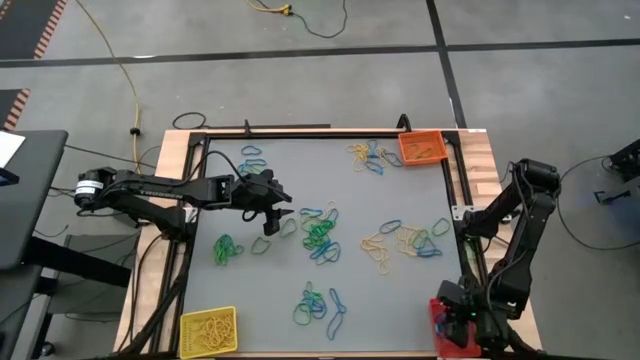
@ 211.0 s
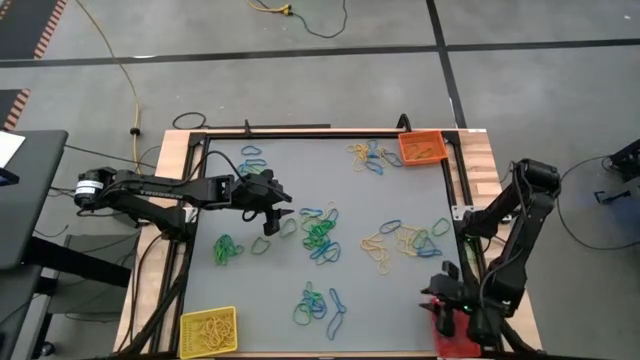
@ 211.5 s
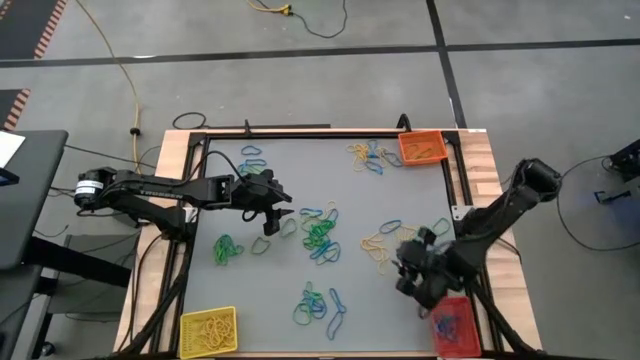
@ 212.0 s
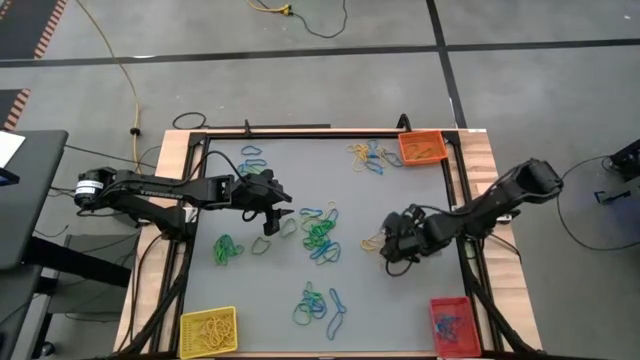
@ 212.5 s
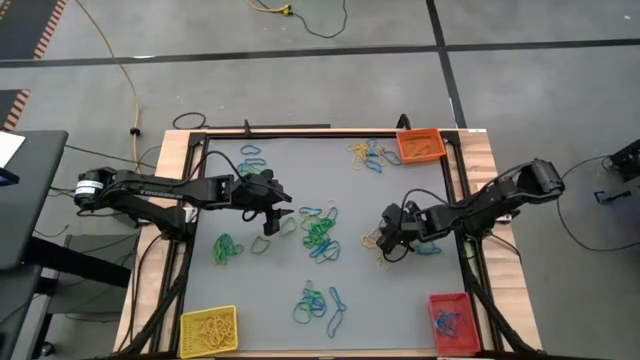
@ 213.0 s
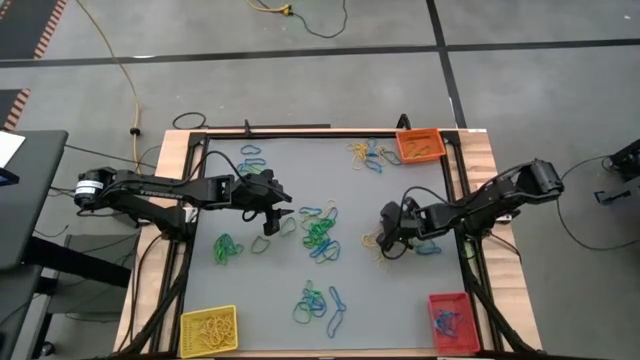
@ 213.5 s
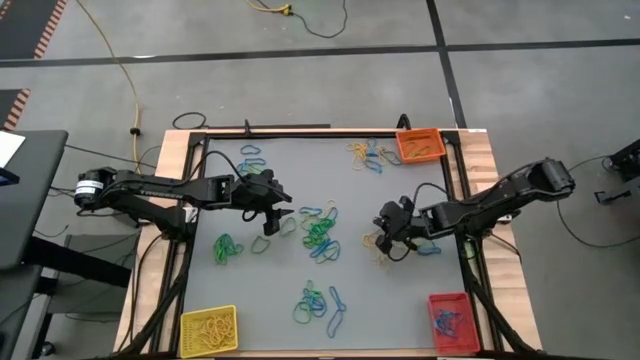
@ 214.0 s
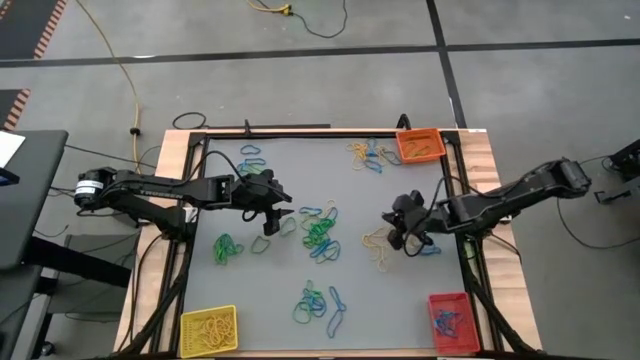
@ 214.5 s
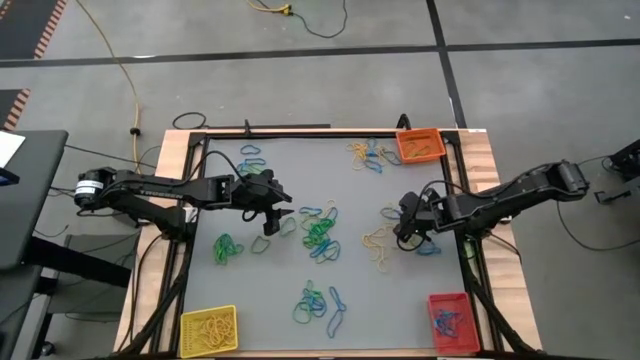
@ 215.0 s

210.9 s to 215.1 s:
Task: Sort rubber bands into baskets
Put the blue rubber band into the red bin

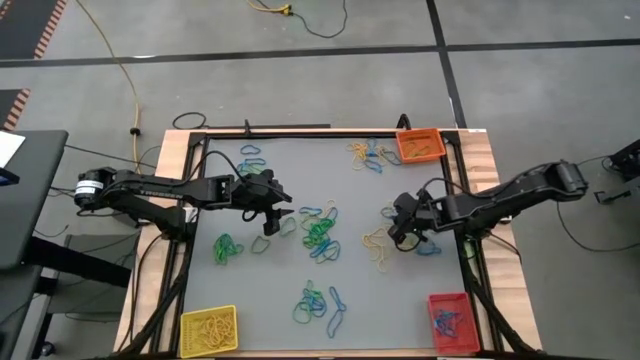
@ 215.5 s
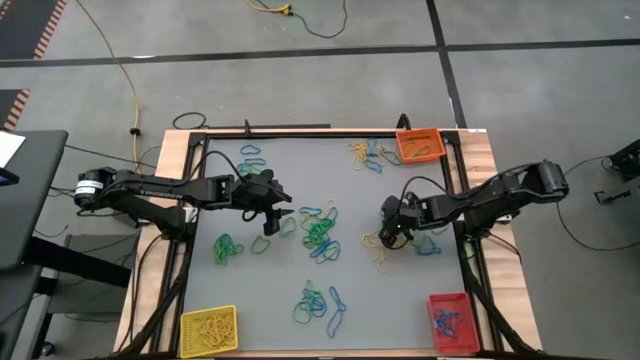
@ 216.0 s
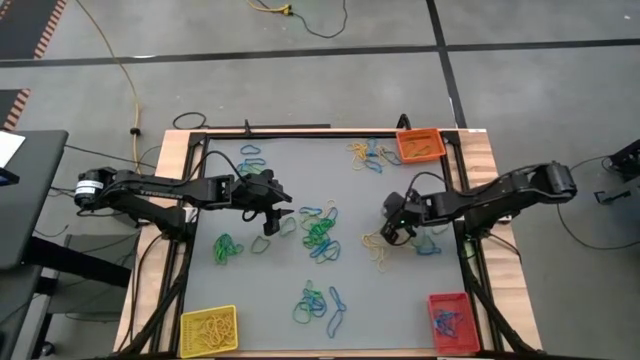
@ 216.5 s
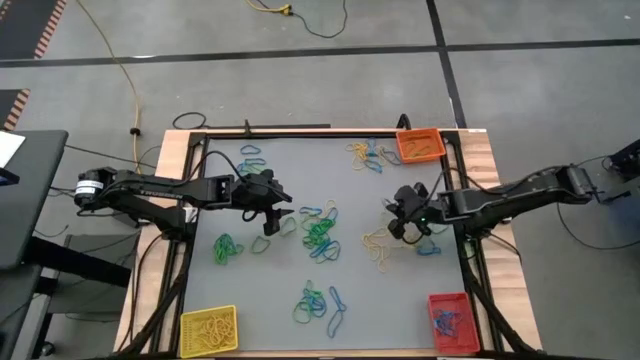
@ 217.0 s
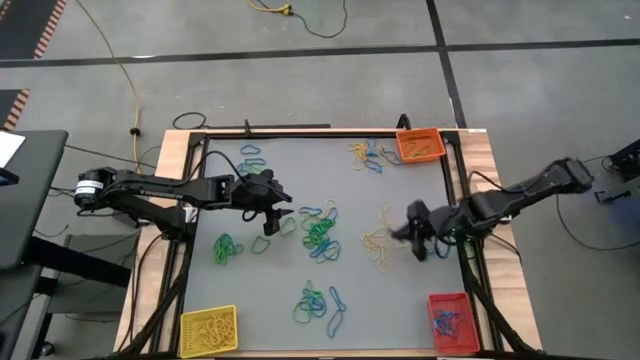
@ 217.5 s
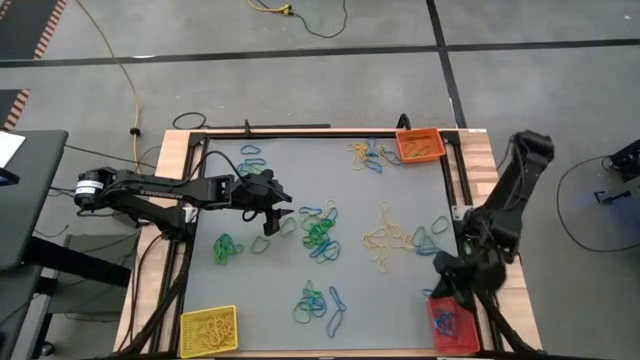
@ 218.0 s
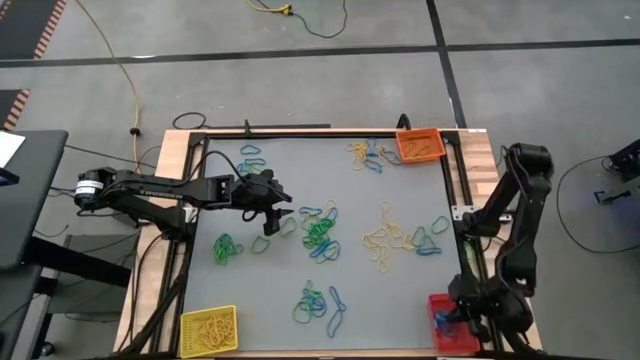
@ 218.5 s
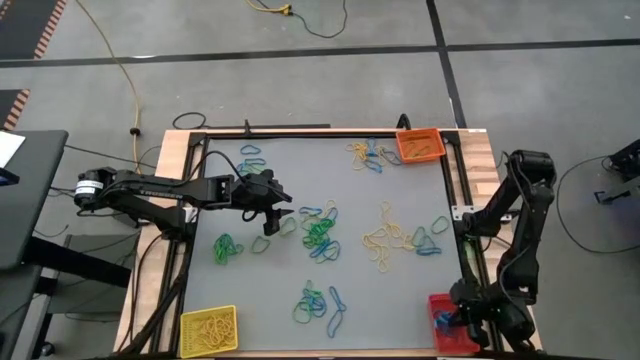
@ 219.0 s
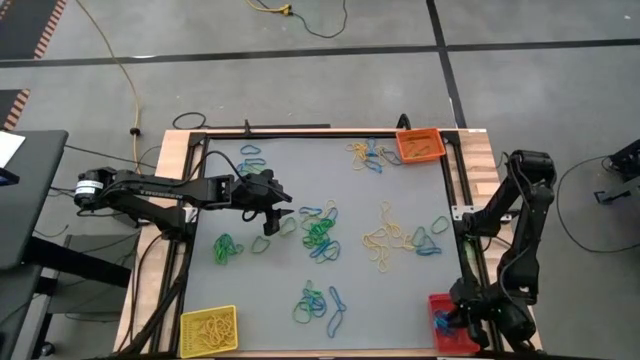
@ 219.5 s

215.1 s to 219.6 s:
Put the blue rubber band into the red bin

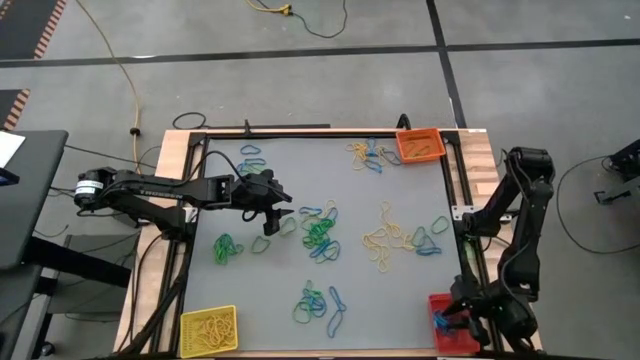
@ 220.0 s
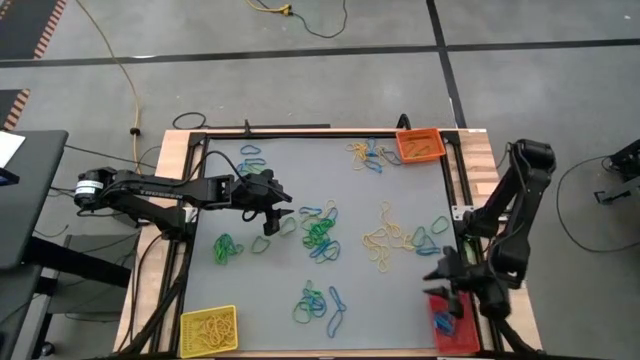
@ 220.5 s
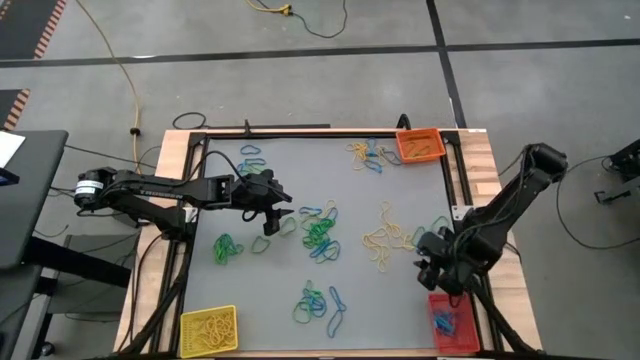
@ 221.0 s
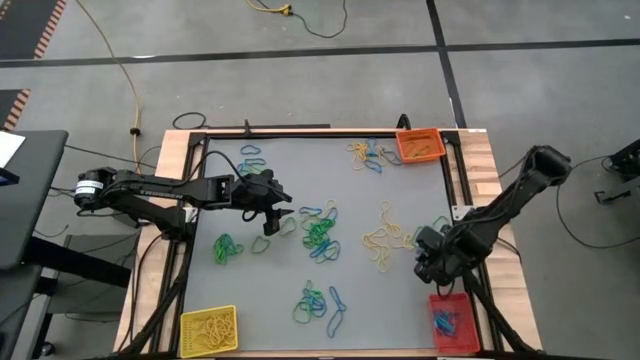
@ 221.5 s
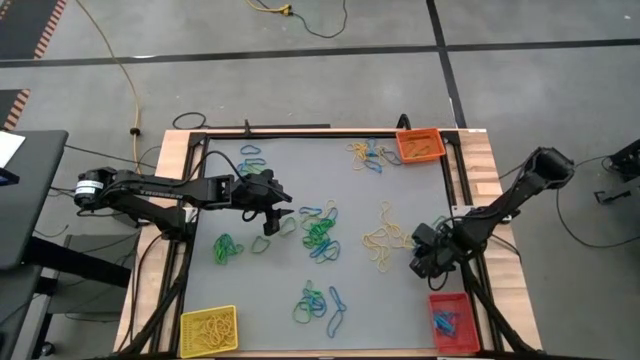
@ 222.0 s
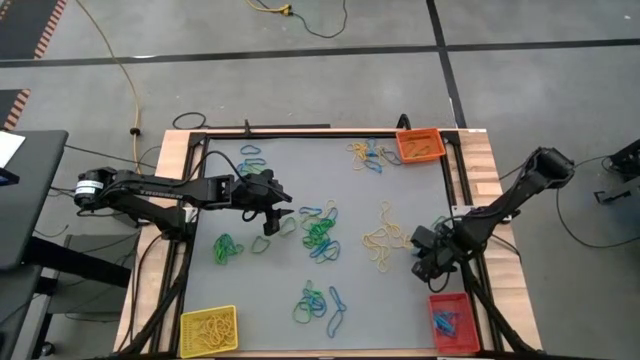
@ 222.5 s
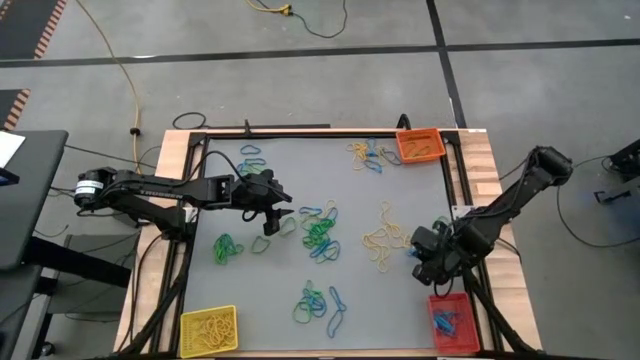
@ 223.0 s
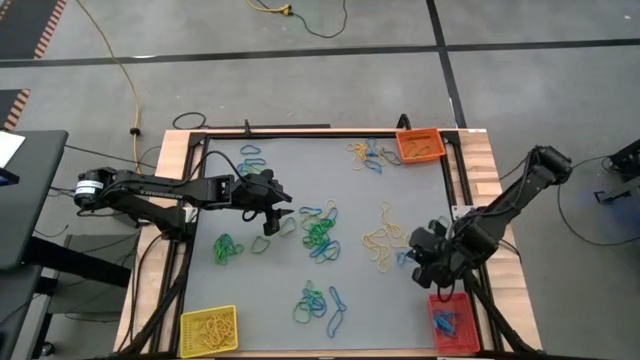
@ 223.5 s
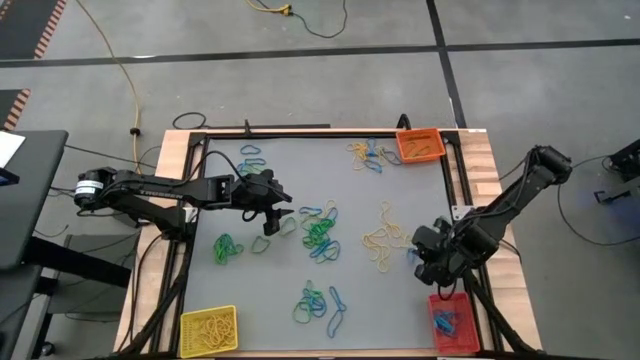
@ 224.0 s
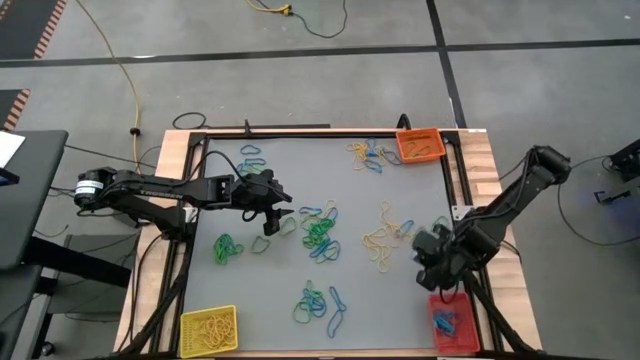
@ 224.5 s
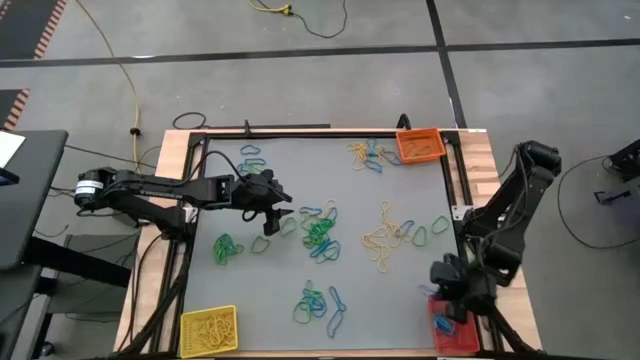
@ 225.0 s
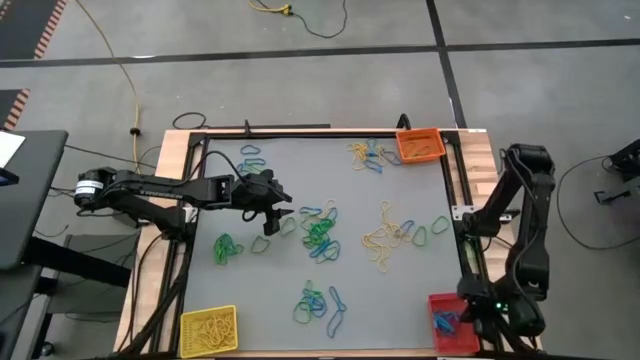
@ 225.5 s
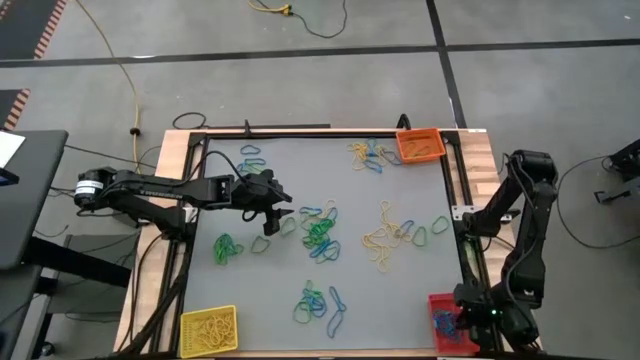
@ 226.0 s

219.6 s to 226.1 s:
Put the blue rubber band into the red bin

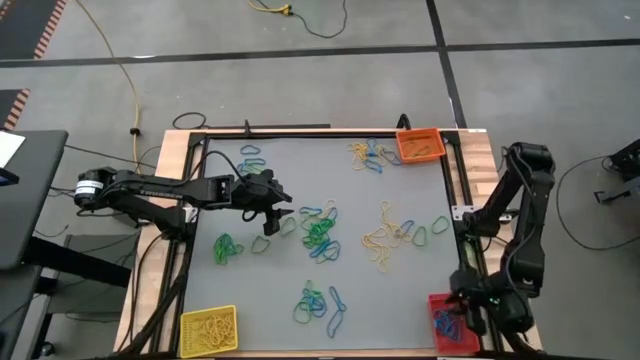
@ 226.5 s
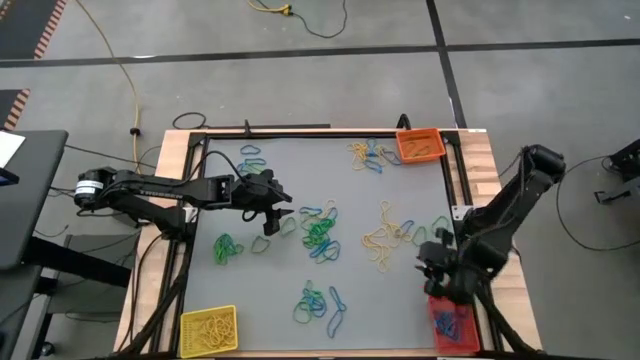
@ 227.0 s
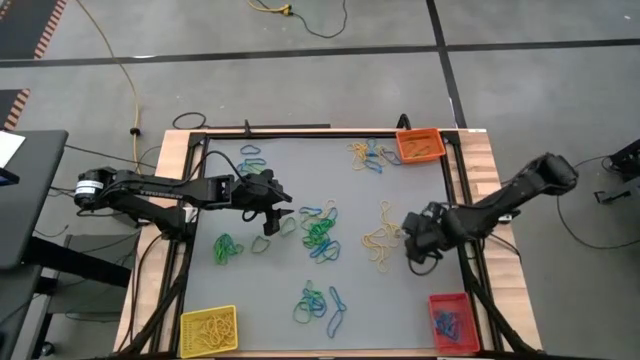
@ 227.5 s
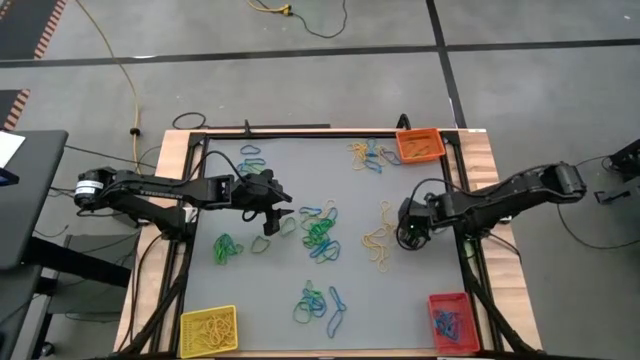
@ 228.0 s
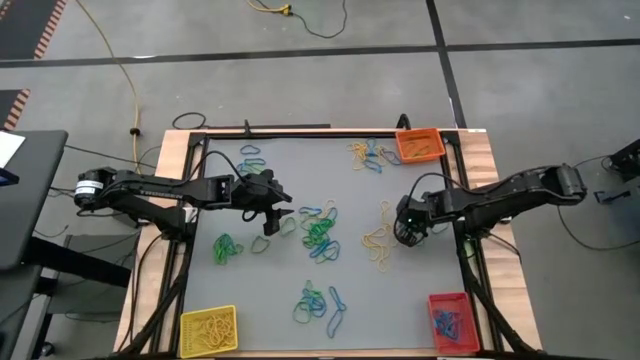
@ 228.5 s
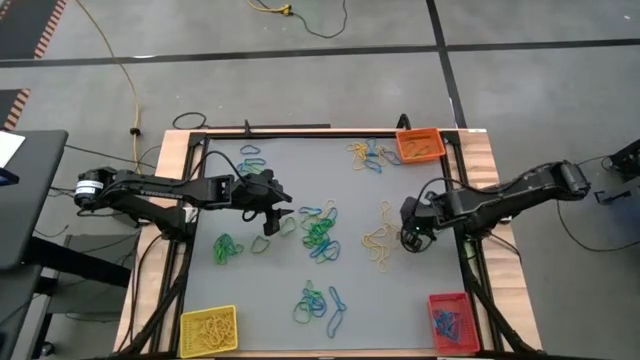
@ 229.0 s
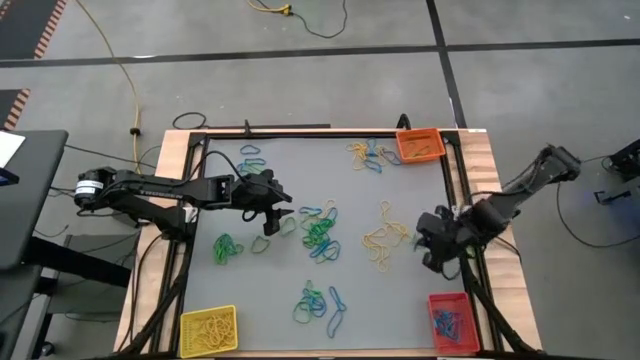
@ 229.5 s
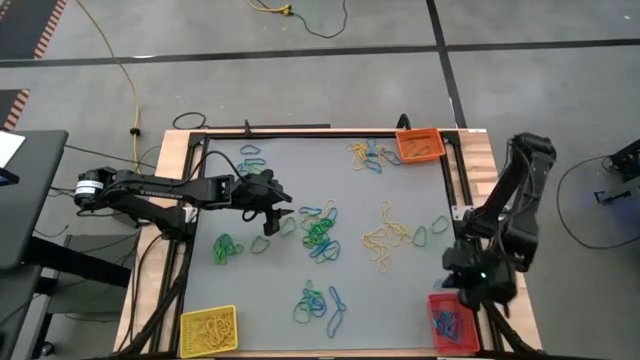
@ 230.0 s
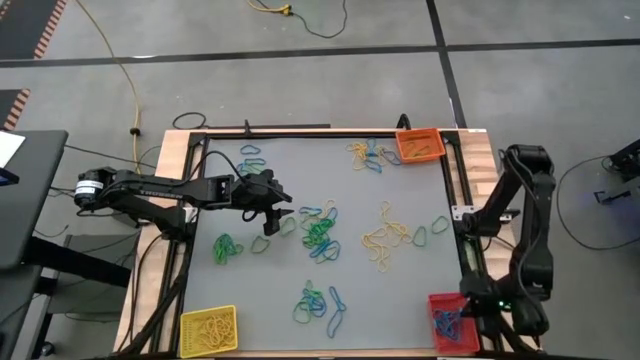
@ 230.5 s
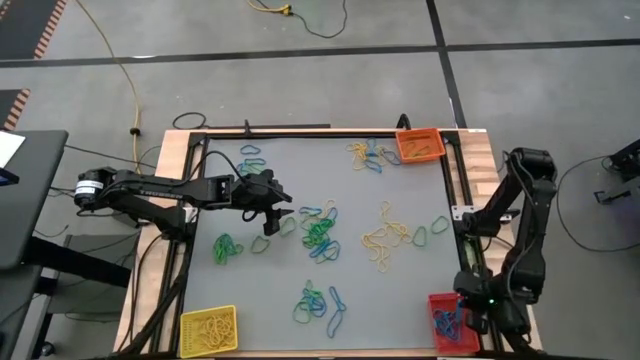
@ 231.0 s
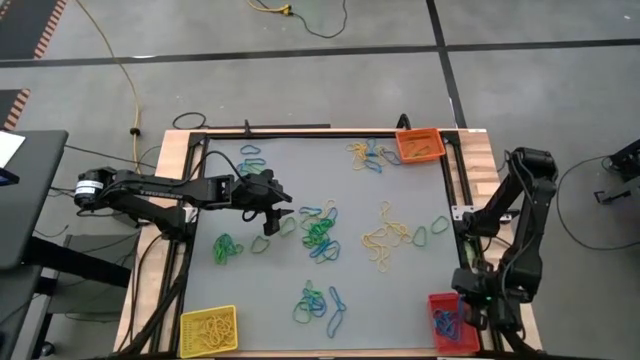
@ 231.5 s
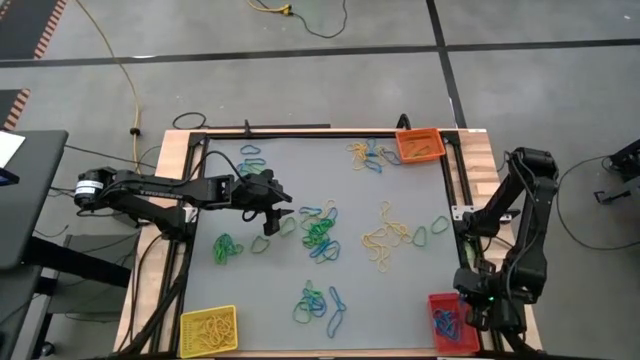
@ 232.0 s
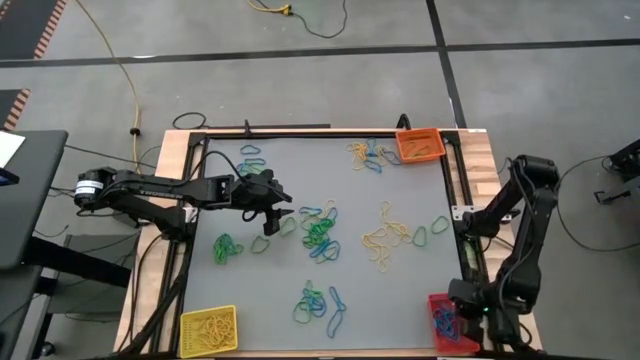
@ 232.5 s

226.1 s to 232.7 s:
Put the blue rubber band into the red bin
